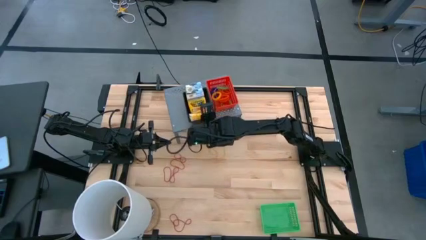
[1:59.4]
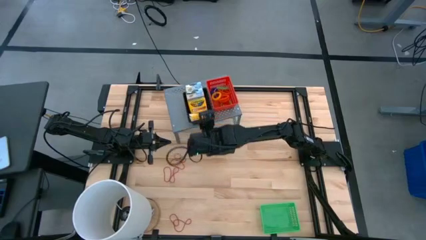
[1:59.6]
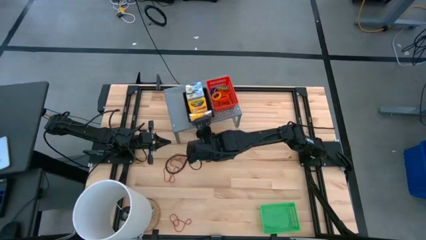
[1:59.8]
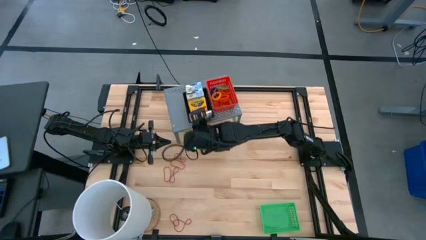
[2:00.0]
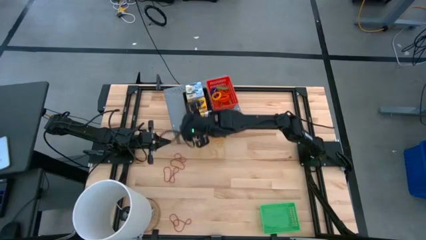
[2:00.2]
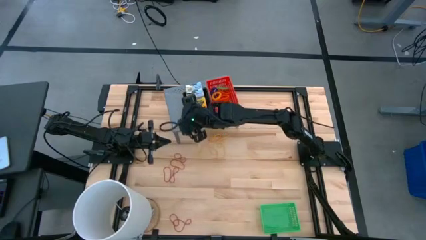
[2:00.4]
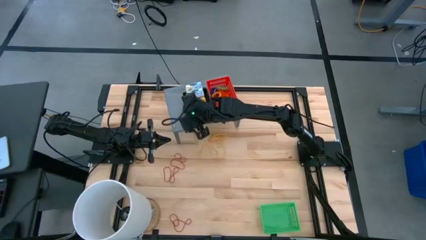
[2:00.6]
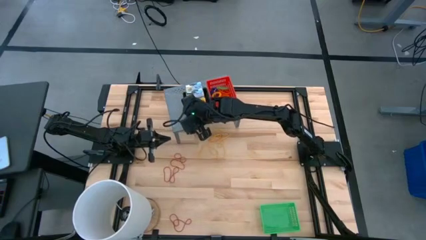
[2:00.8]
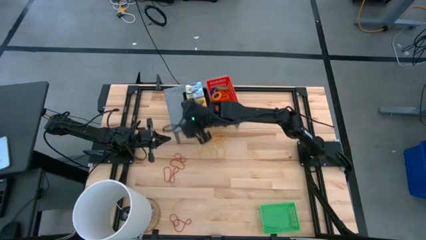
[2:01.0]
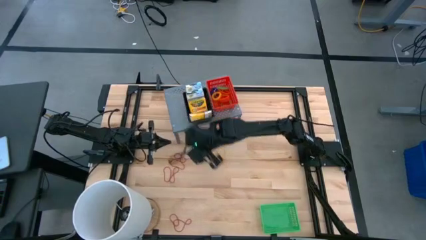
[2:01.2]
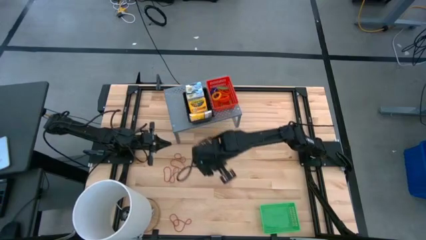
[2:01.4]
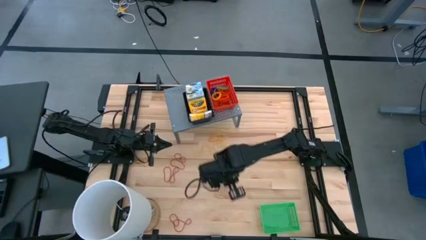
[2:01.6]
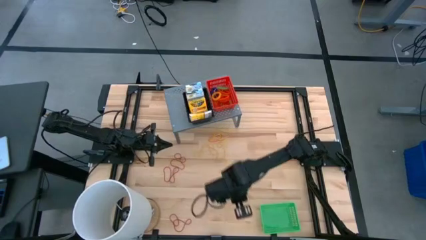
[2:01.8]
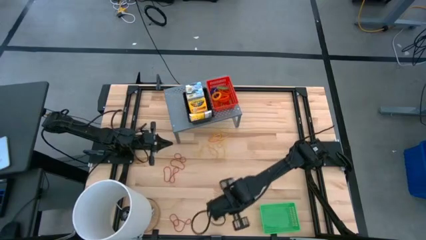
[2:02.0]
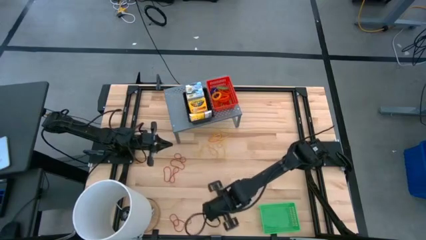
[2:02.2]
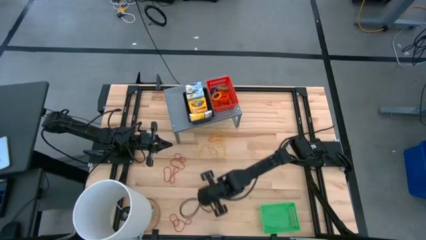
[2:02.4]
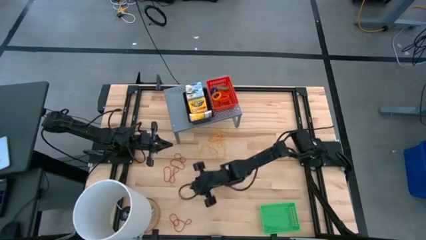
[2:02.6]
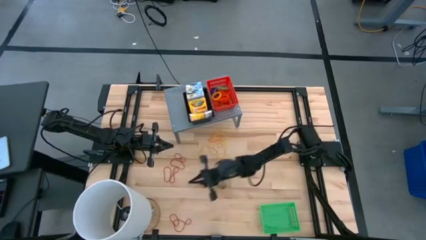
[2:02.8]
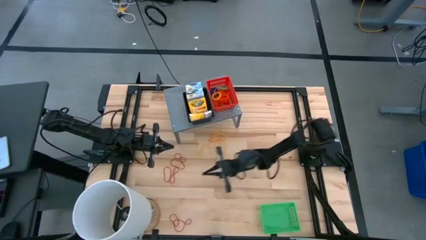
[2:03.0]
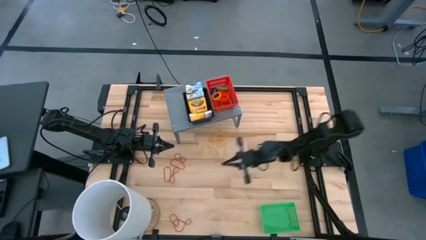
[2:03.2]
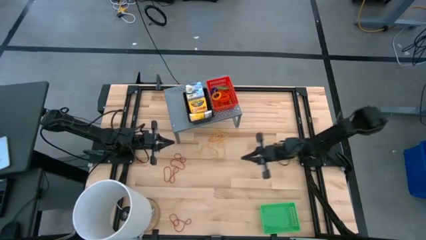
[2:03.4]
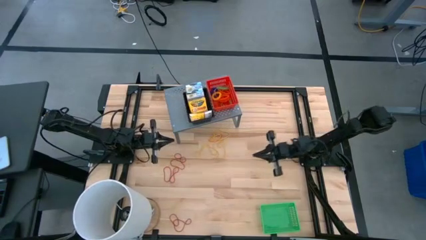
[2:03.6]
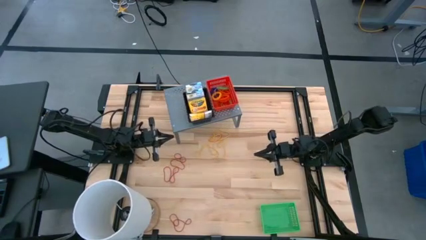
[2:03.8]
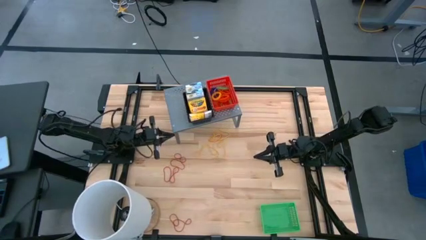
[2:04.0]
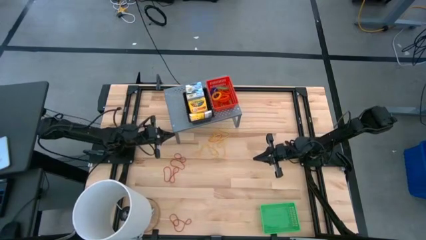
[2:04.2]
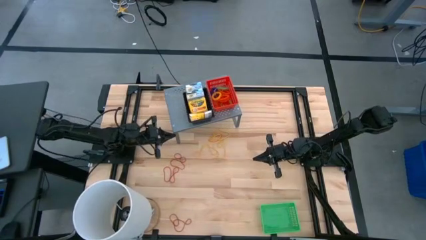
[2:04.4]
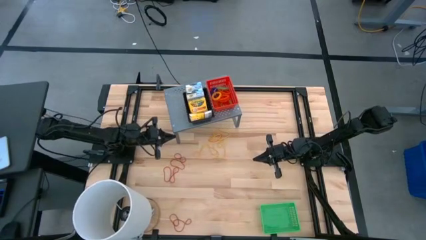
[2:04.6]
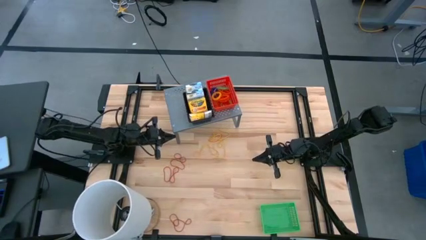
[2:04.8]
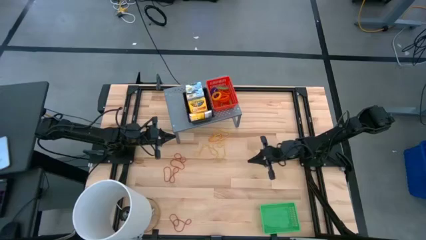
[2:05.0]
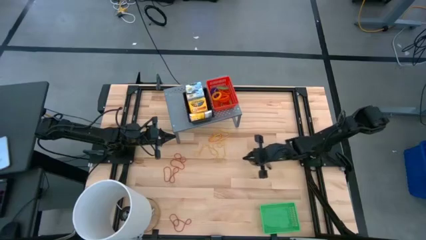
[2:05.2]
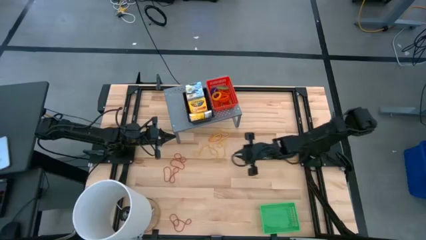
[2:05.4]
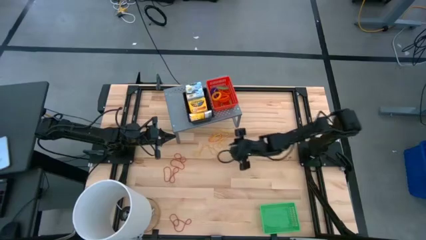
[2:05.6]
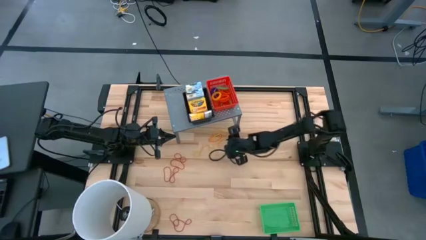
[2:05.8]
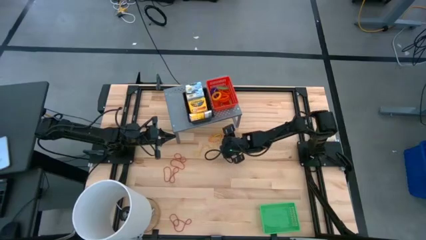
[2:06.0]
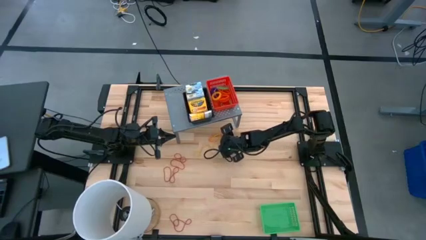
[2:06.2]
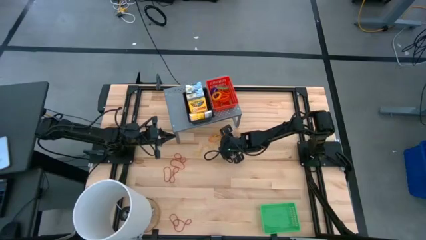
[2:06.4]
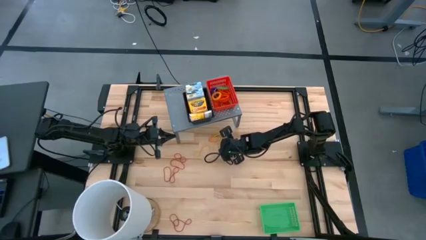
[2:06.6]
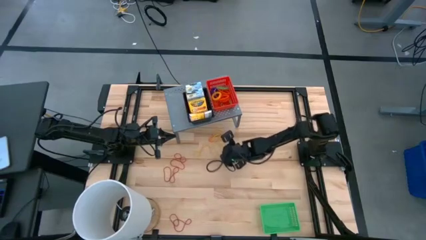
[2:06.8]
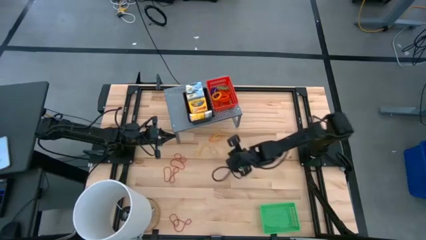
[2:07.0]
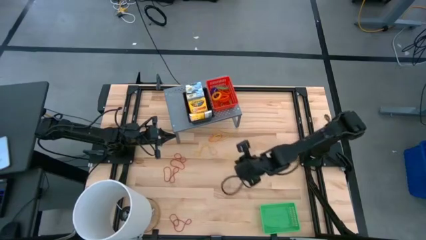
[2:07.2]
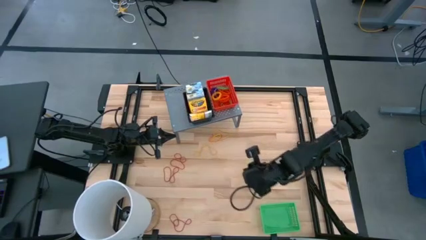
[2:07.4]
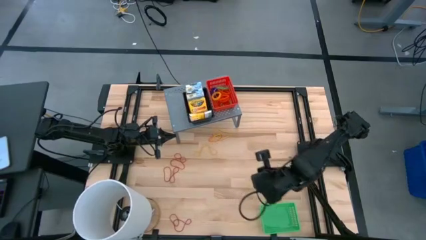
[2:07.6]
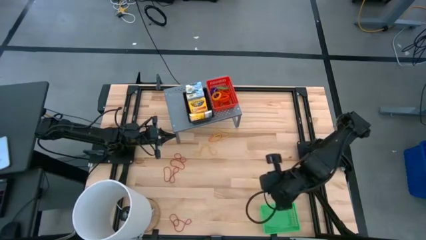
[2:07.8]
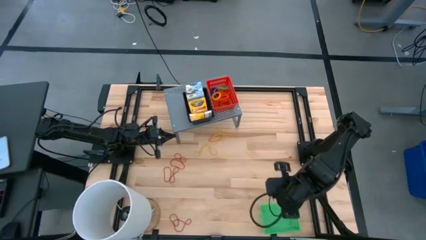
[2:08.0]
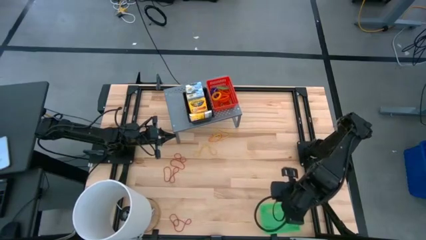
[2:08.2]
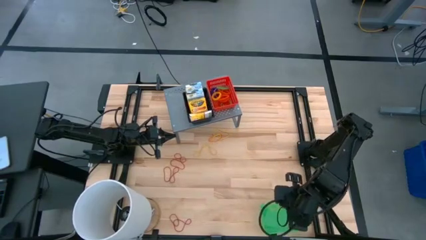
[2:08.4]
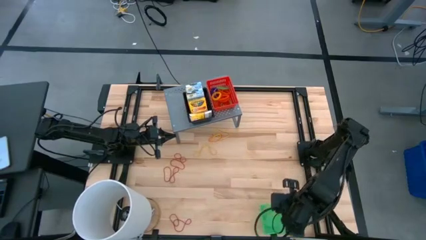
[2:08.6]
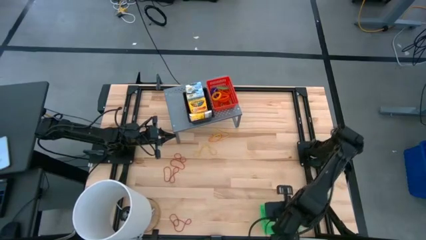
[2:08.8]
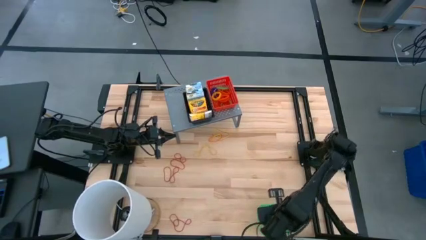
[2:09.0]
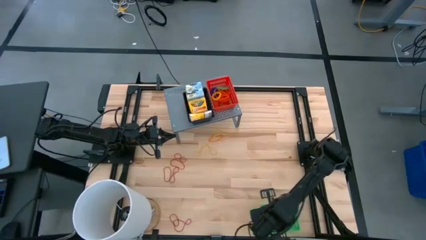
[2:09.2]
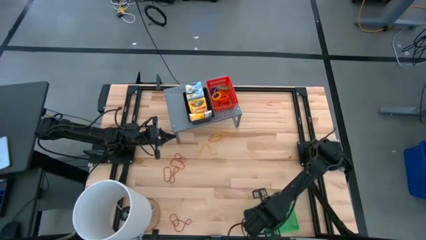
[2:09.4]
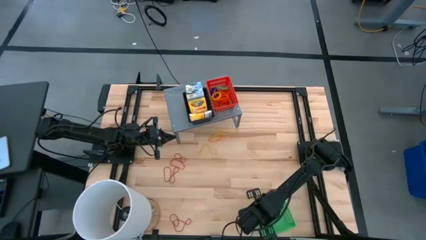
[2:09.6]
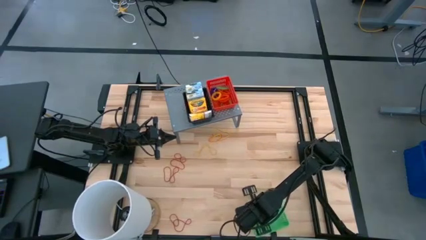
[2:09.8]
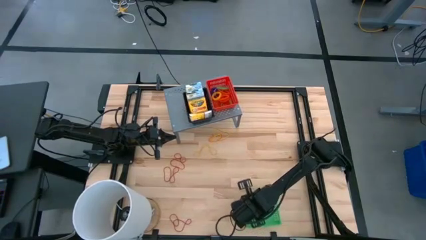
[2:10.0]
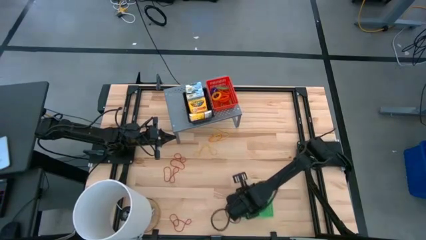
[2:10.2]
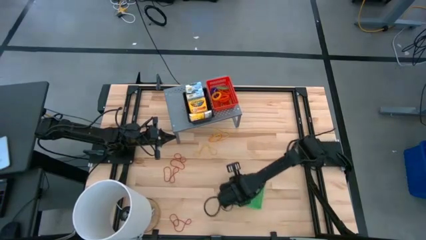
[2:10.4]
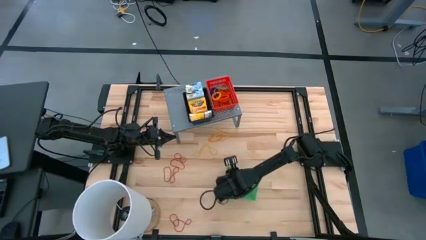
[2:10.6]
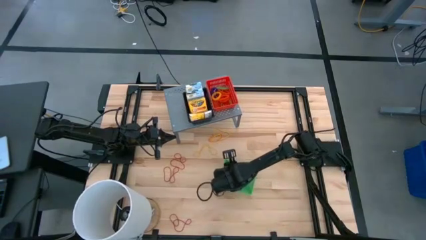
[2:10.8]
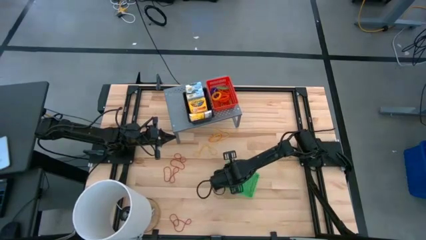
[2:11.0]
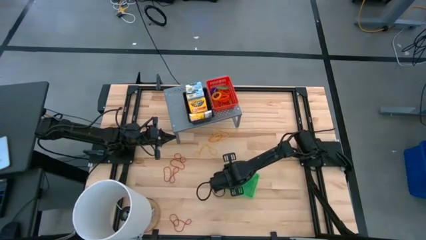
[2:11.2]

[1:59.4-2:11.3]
Task: Pick & Place Office Desk Supplies
Put the bottom right yellow rubber band into the green bin

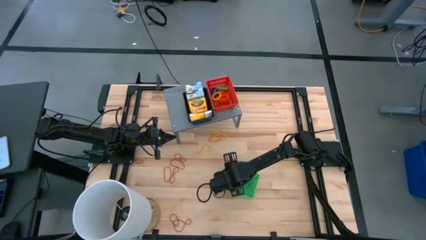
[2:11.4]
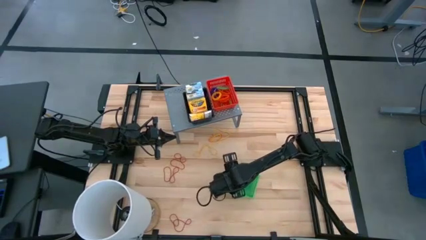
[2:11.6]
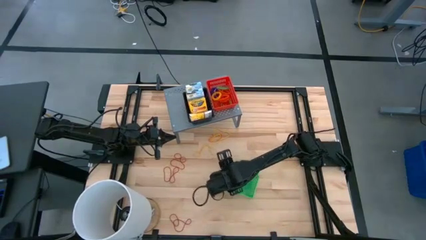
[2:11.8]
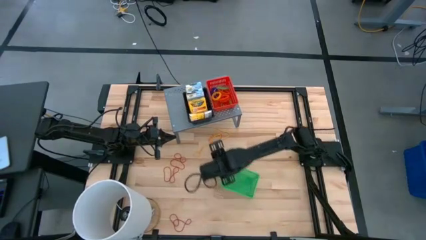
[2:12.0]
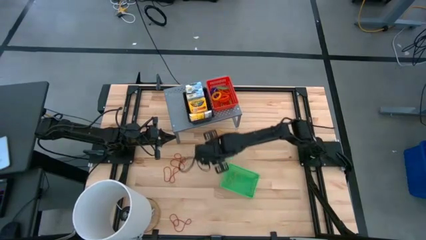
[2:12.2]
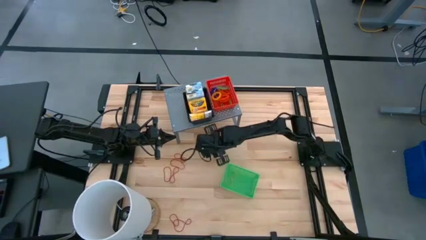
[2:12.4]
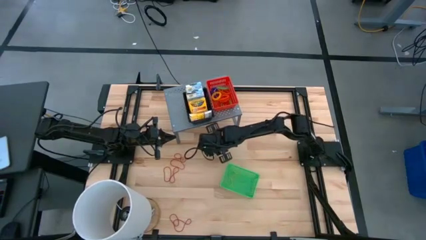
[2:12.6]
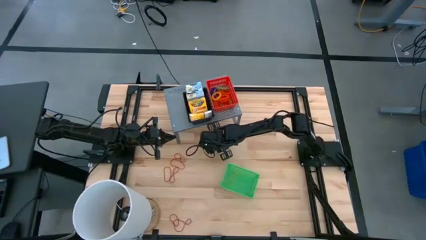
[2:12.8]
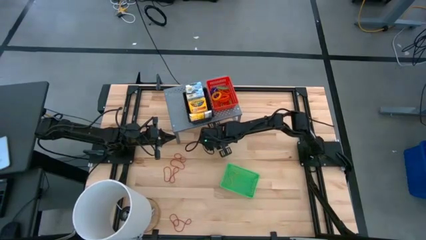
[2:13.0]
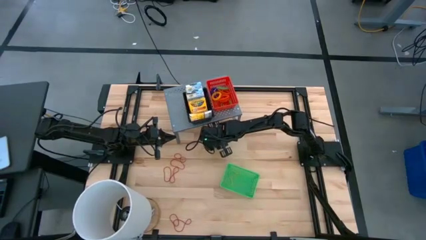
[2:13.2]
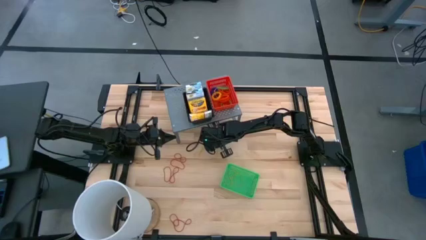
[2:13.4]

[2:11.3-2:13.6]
Put the top yellow rubber band into the green bin

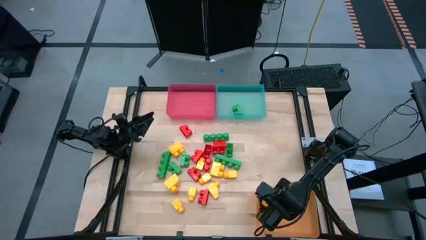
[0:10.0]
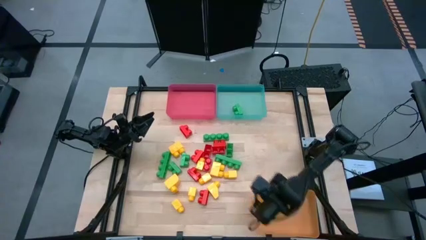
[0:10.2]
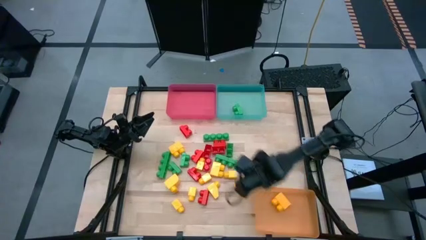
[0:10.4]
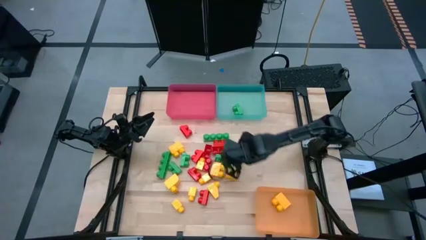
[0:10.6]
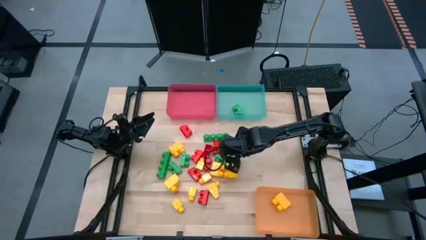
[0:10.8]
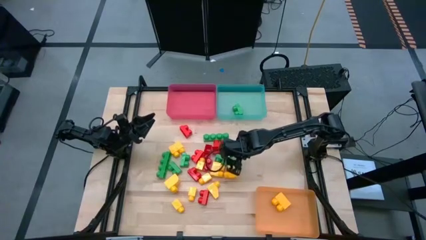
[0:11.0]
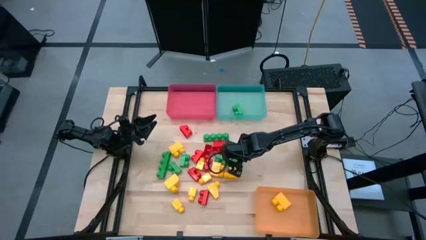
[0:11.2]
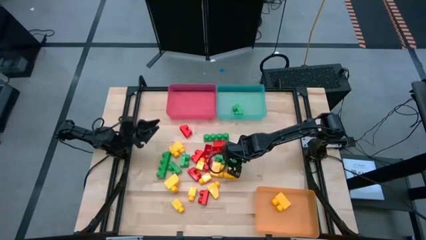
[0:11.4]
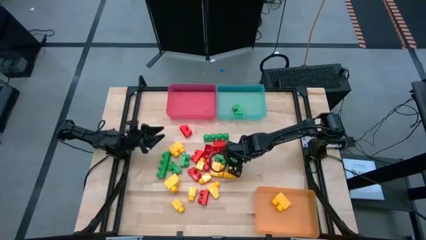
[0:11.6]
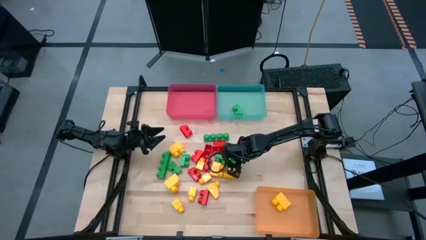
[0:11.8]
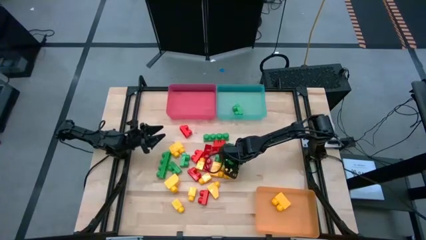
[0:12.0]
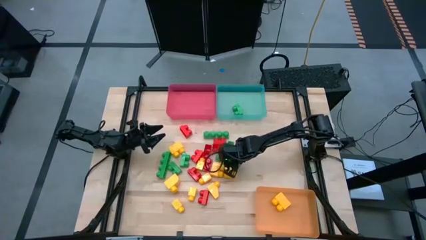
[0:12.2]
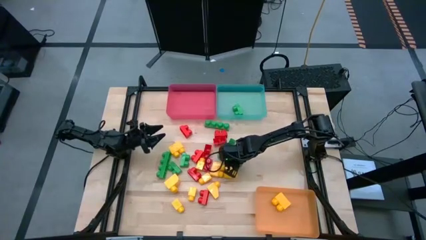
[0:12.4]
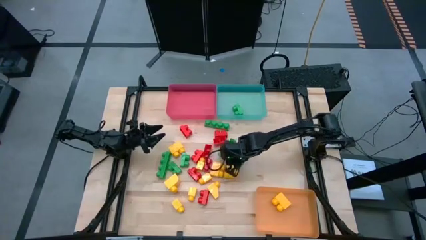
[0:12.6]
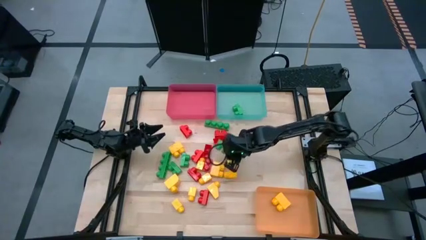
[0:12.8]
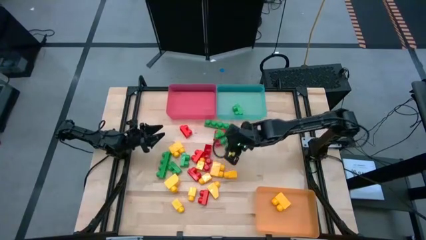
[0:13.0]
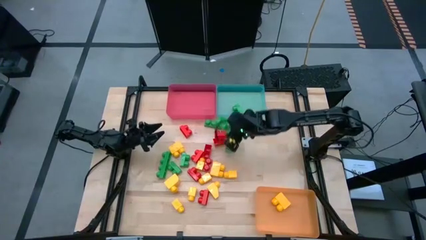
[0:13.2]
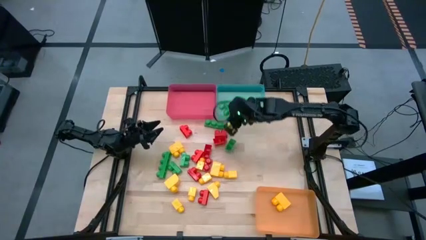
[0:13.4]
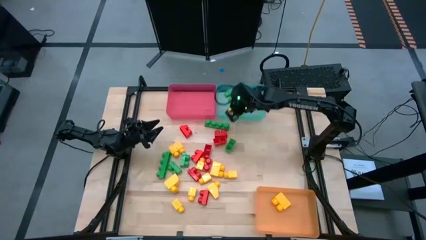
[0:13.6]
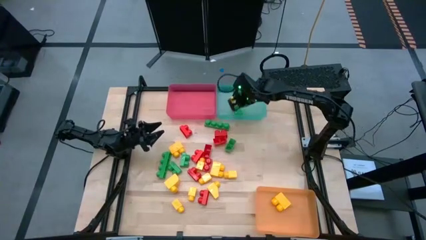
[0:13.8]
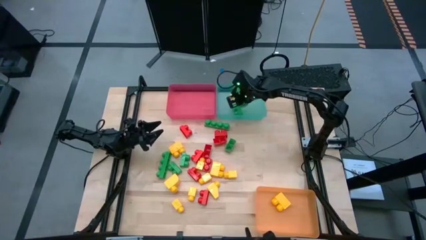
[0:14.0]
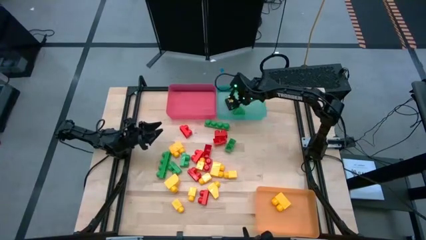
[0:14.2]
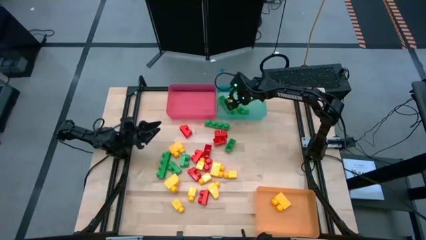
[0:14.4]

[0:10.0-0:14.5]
Task: Sort blocks
Put the green game piece into the green bin
